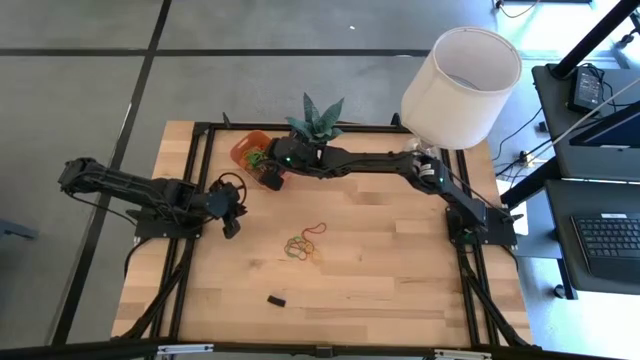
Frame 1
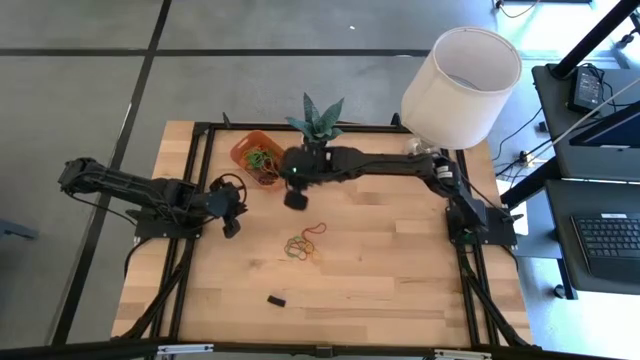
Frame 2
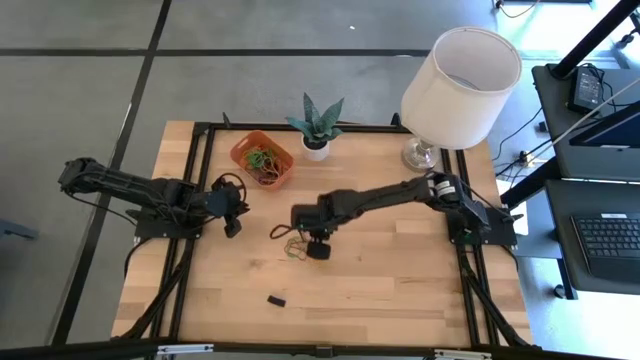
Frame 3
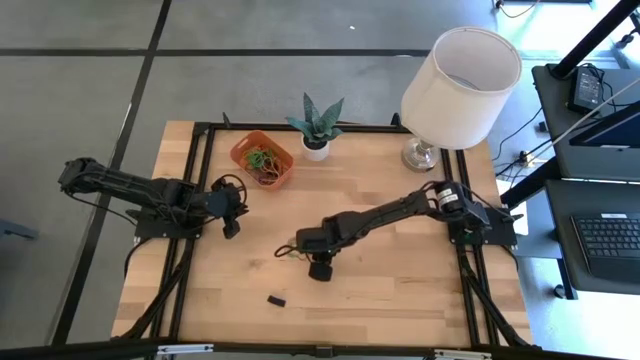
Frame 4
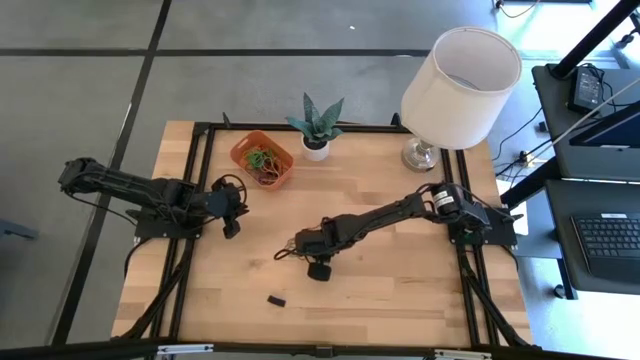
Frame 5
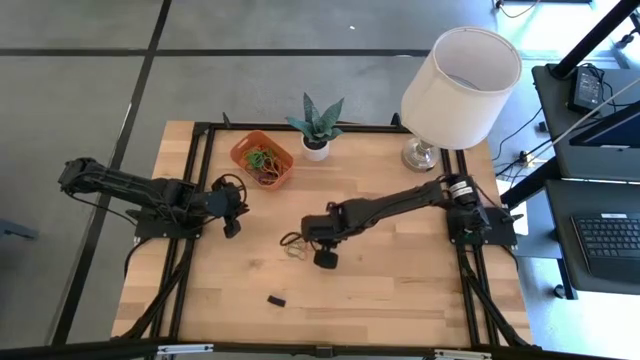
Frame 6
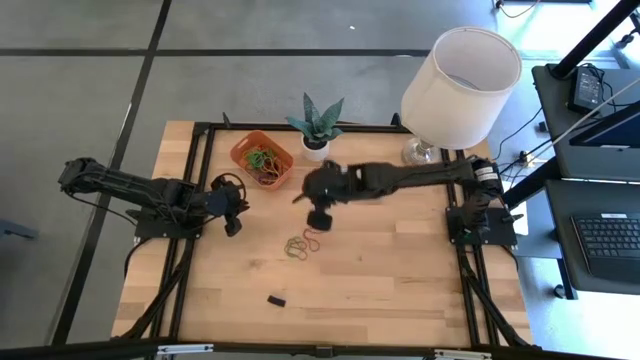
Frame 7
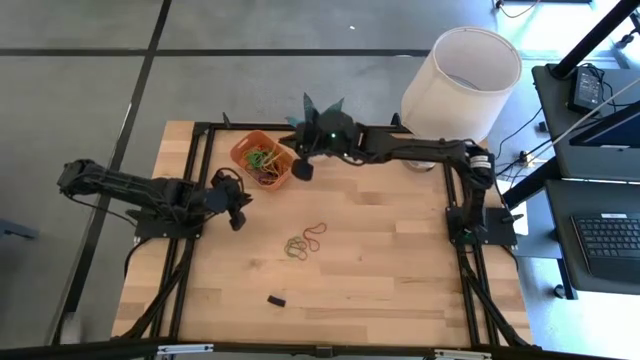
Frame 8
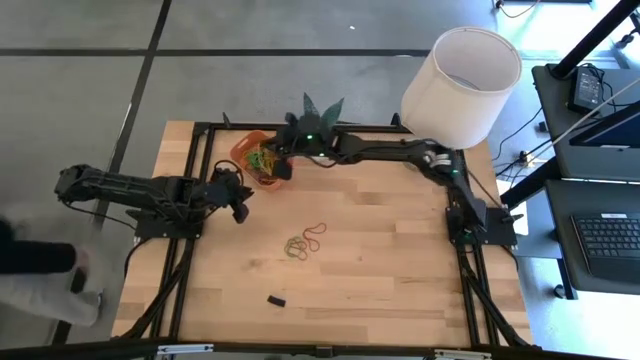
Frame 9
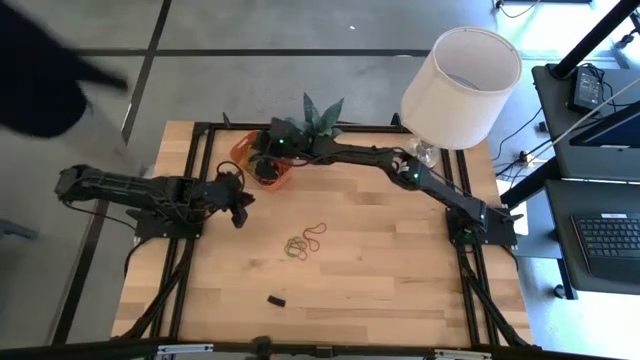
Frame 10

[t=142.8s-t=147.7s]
Task: Pick and place rubber bands into bin
Put the yellow rubber band into the orange bin

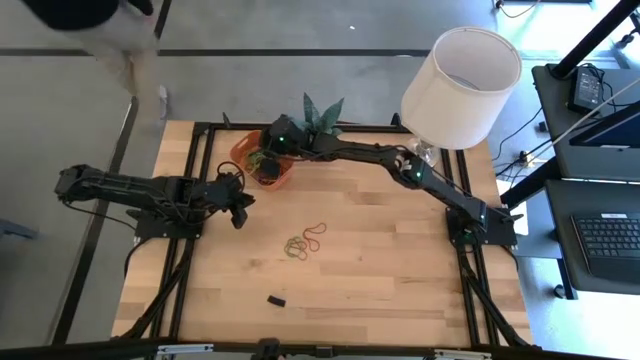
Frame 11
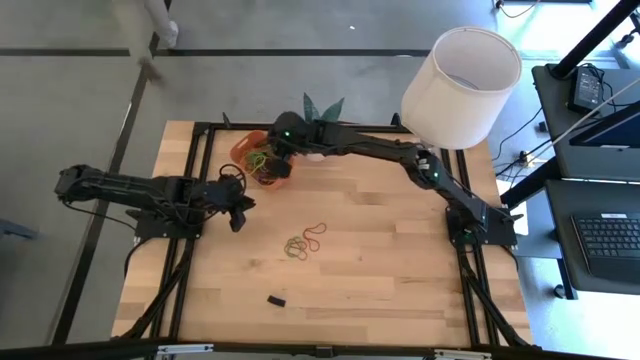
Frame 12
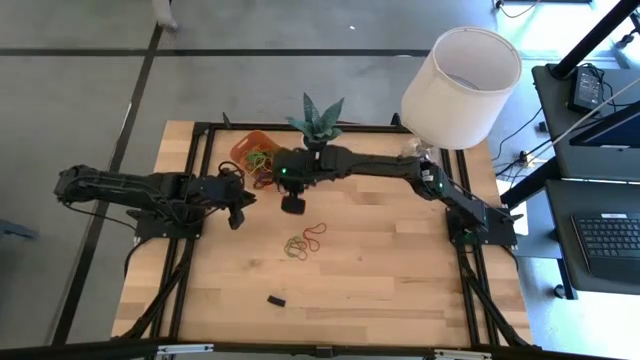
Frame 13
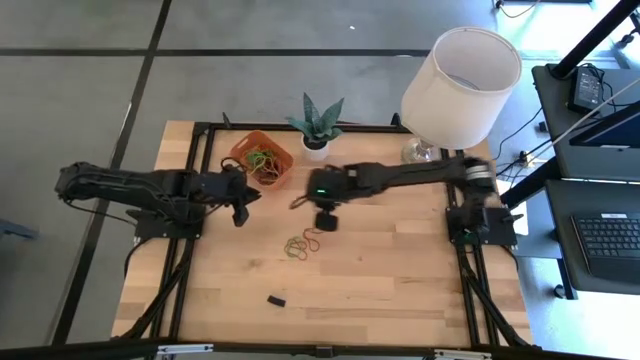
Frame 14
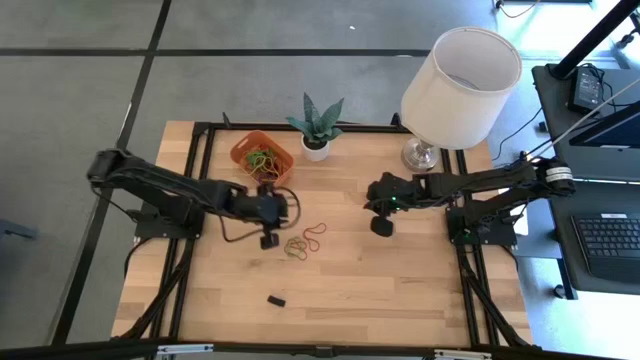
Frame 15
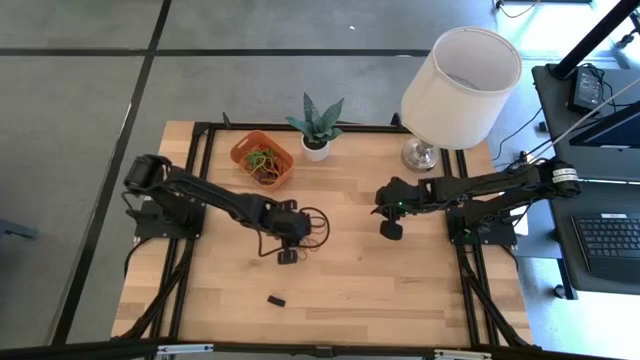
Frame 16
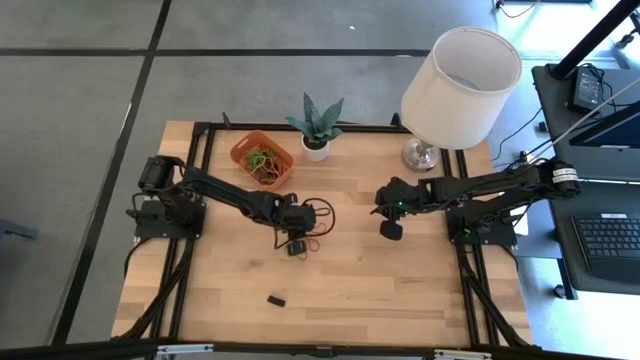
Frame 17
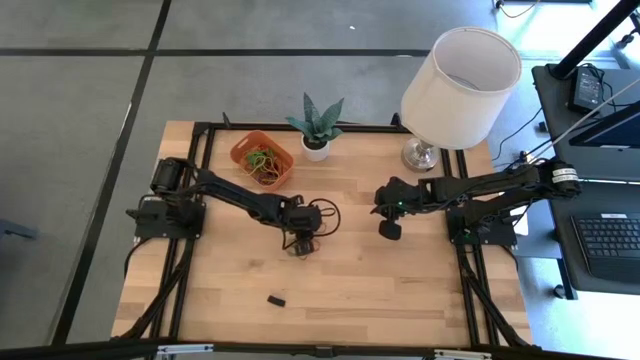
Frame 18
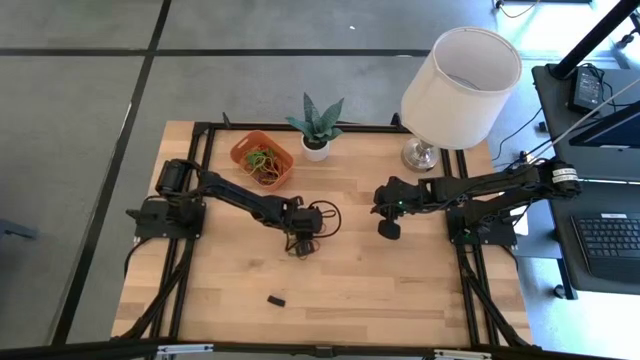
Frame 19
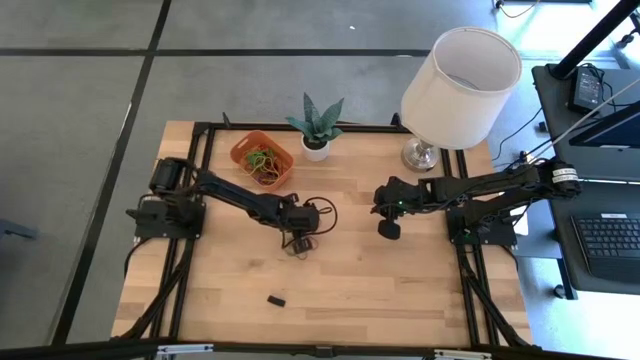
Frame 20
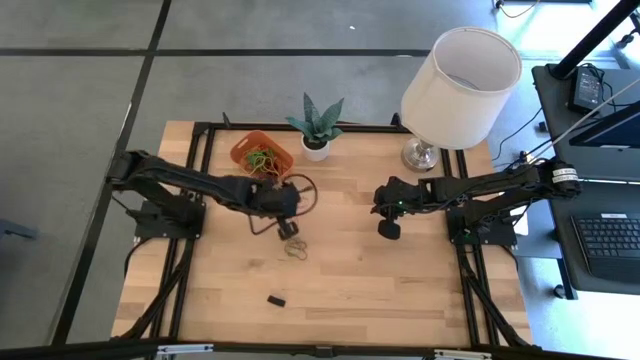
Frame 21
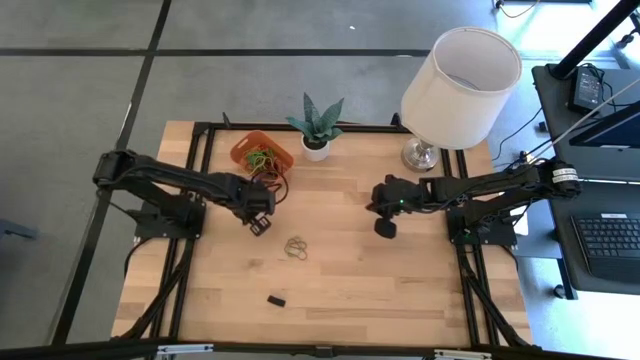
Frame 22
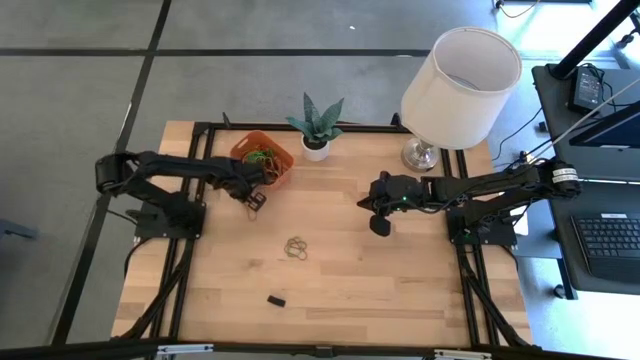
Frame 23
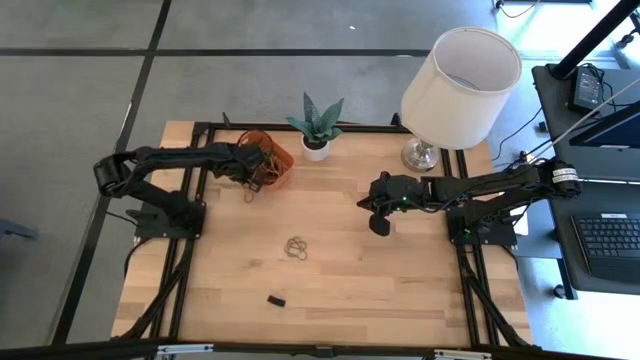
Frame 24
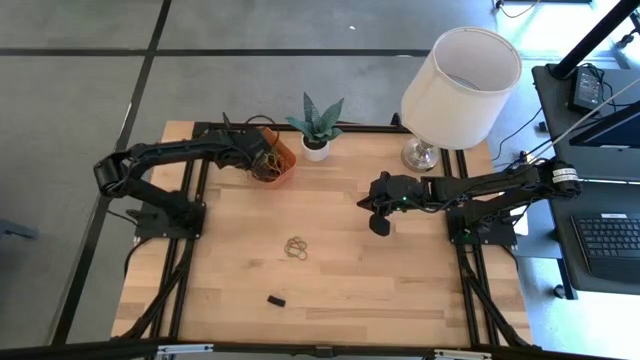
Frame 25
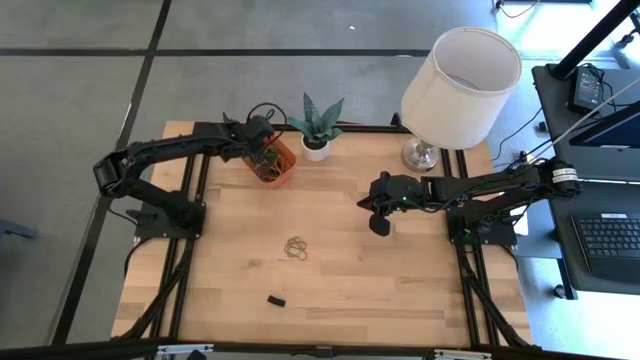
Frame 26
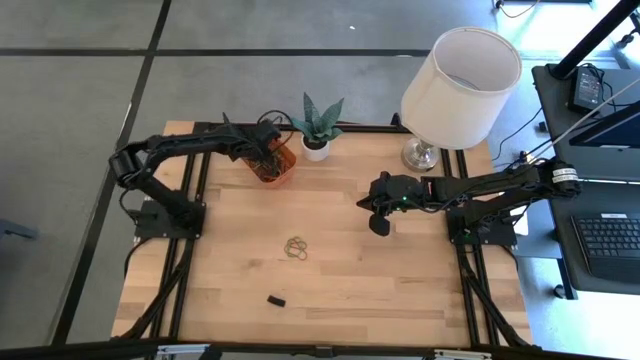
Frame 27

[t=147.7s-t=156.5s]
Put the red rubber band into the orange bin

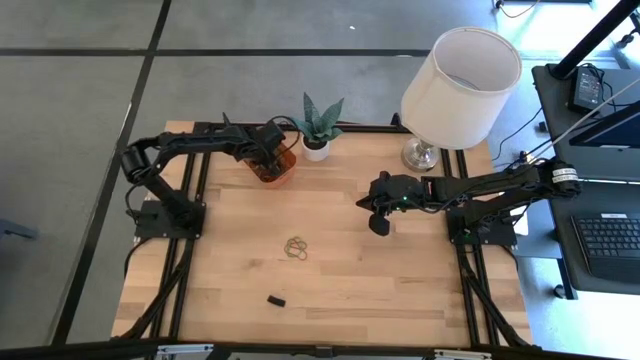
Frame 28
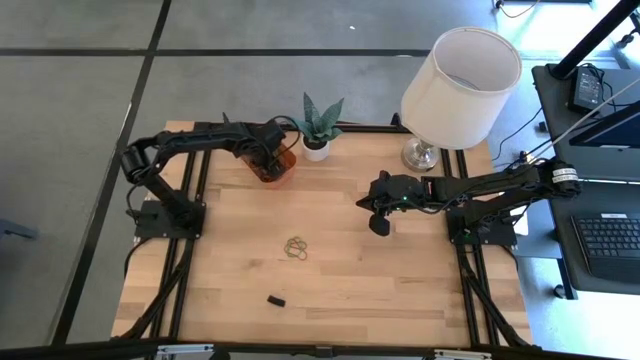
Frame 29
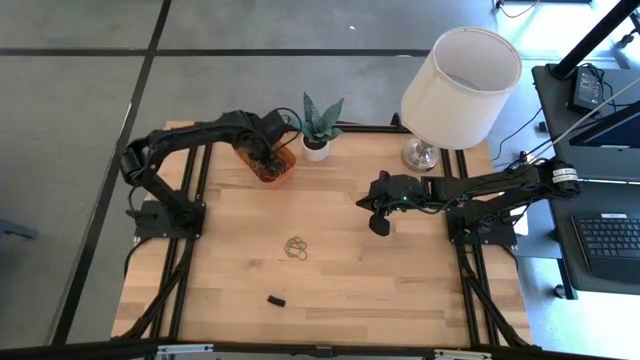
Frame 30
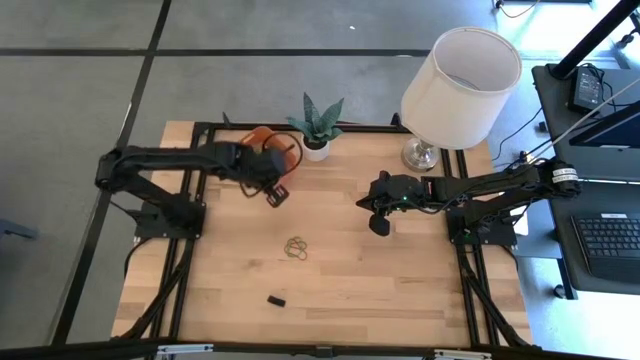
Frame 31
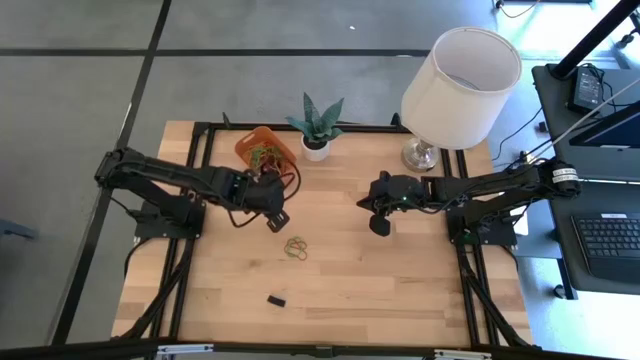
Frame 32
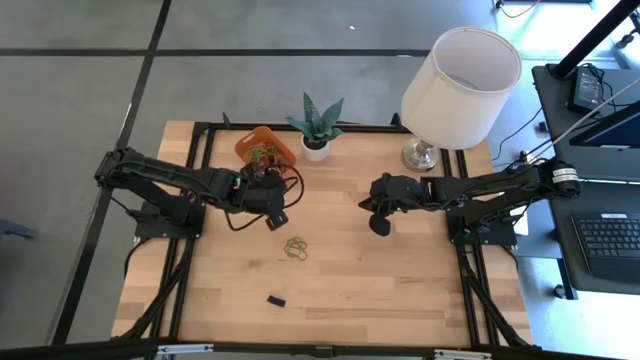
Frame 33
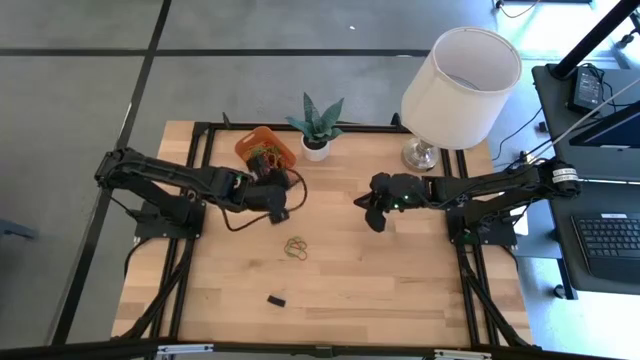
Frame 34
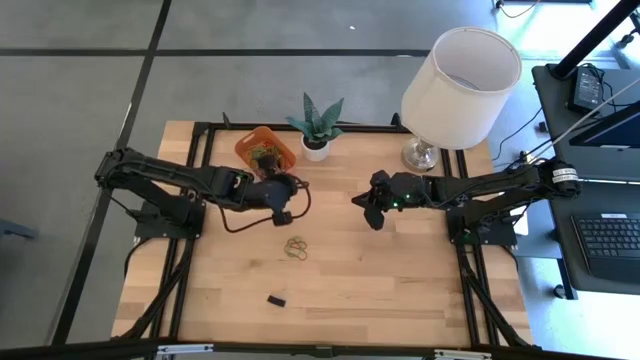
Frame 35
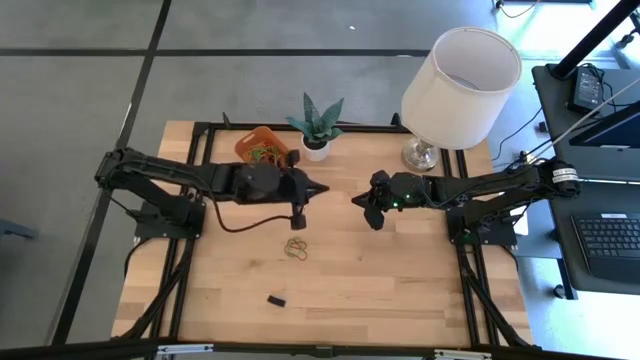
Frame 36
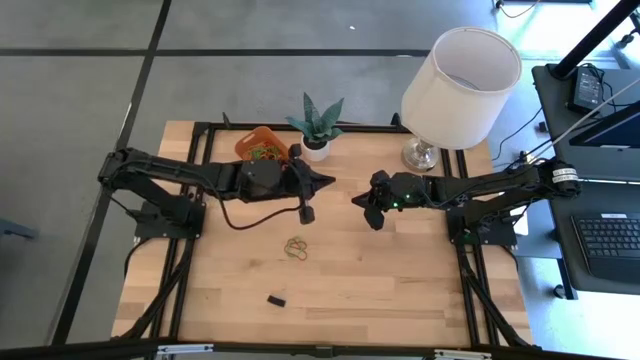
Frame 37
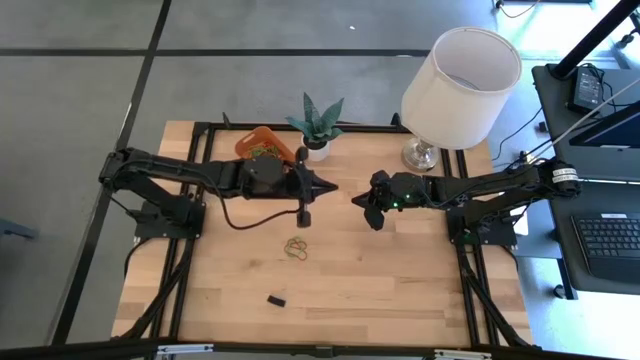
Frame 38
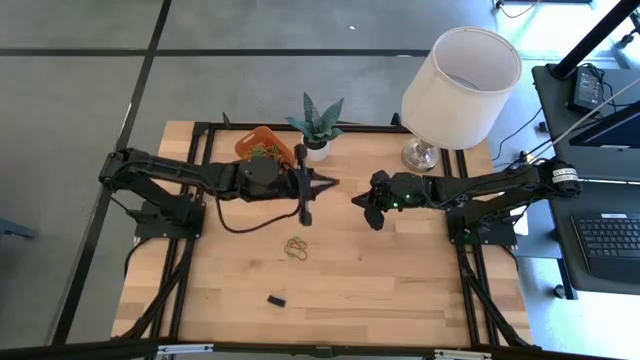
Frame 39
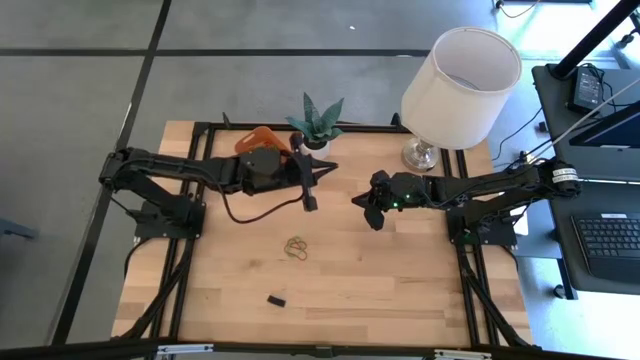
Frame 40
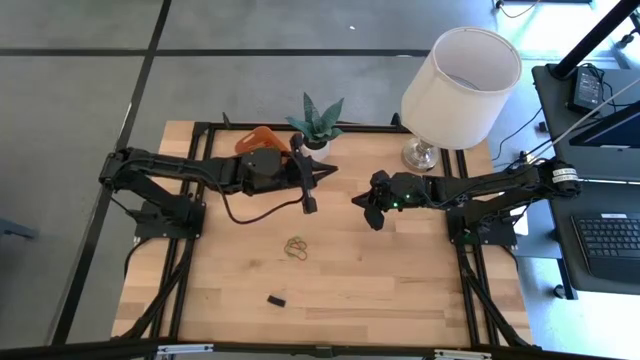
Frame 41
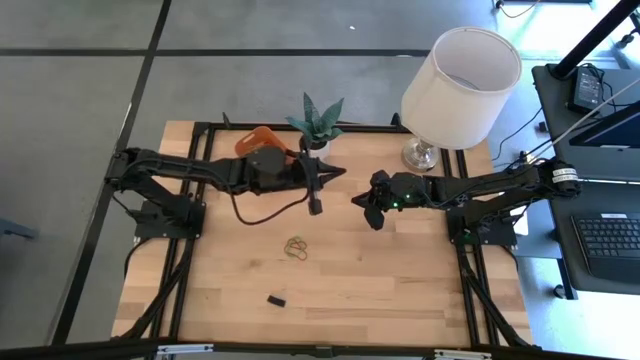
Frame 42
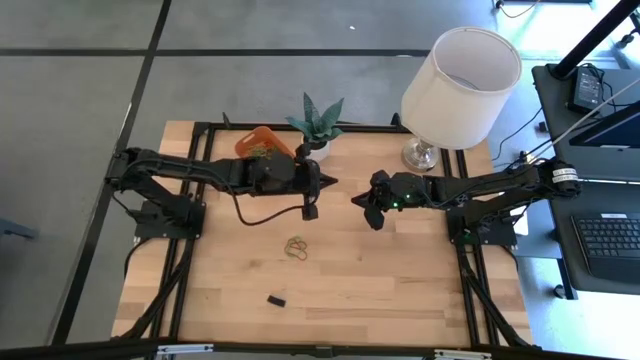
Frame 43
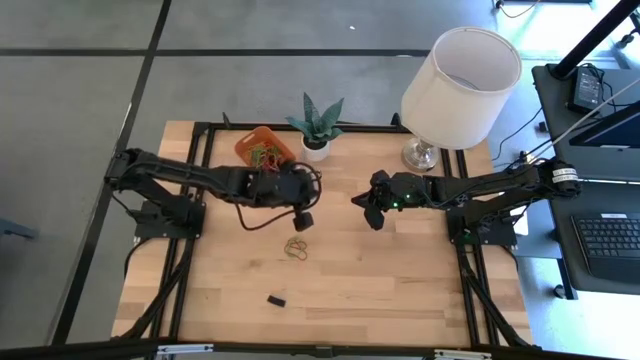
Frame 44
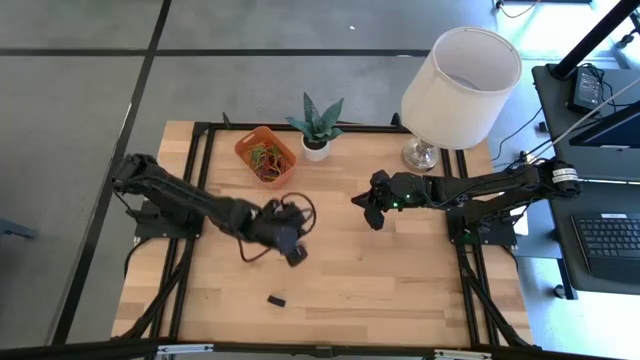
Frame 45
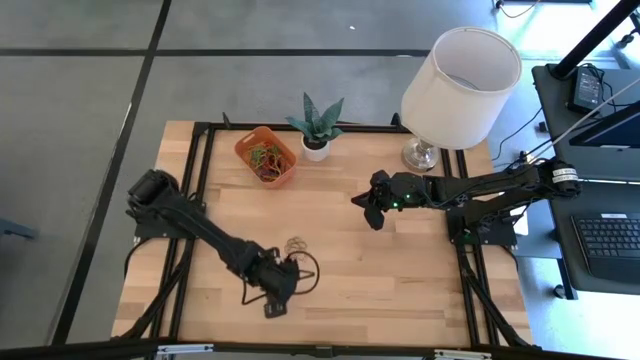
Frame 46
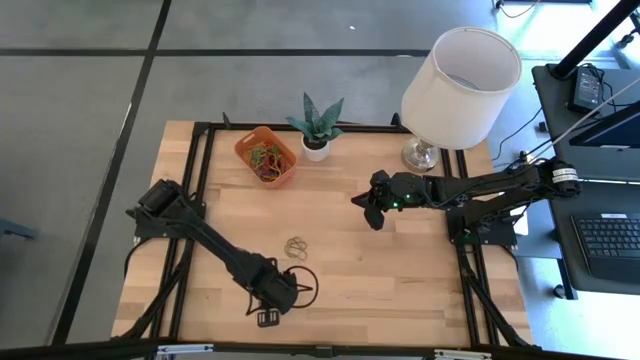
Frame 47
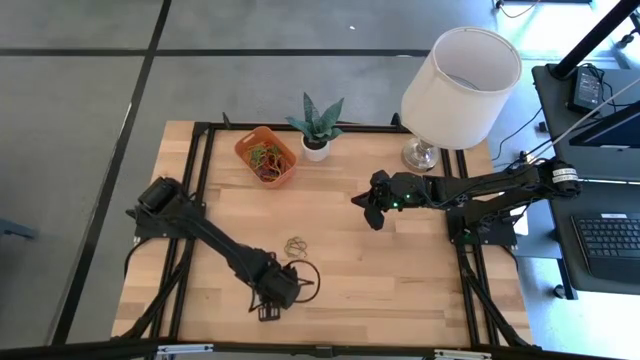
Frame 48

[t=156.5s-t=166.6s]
Put the black rubber band into the orange bin
